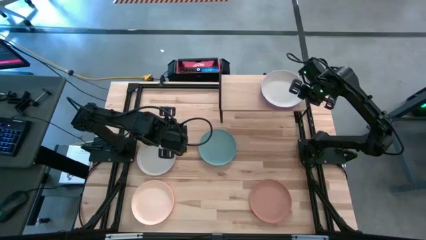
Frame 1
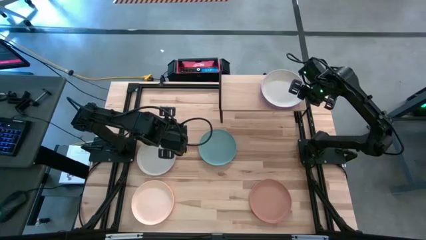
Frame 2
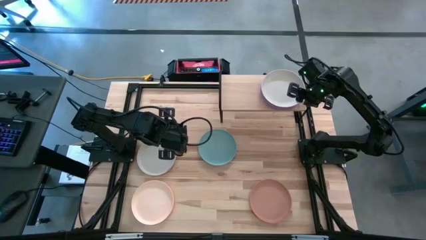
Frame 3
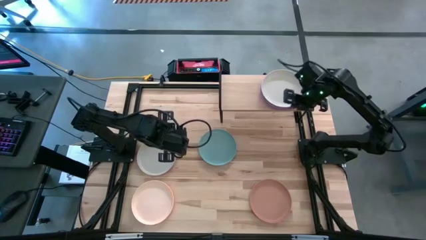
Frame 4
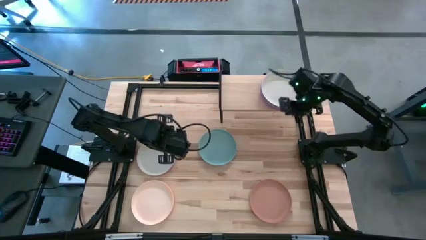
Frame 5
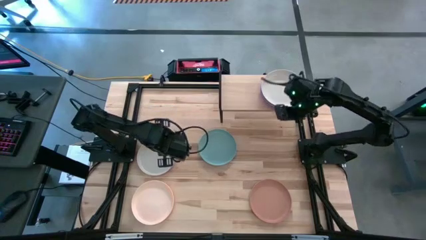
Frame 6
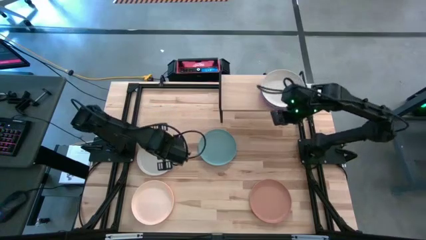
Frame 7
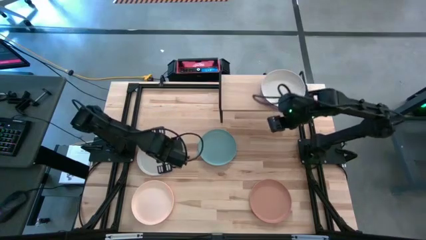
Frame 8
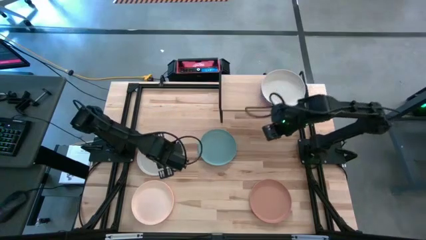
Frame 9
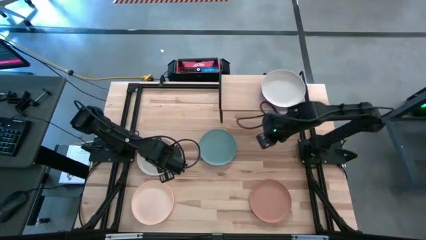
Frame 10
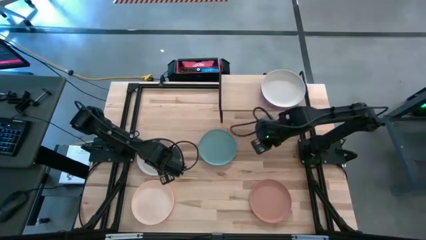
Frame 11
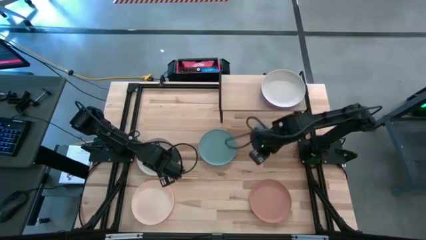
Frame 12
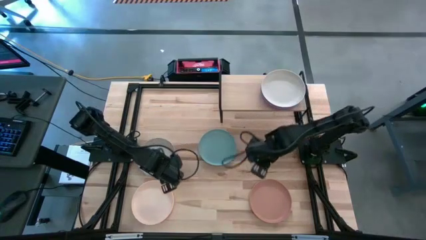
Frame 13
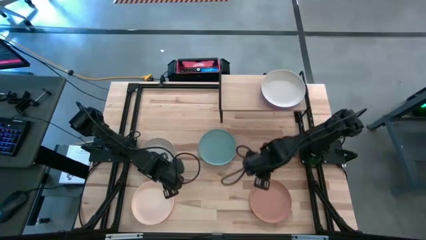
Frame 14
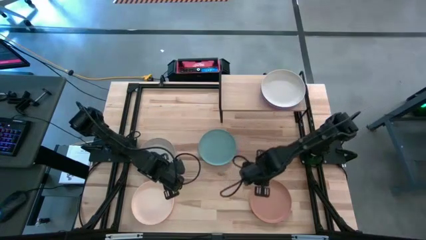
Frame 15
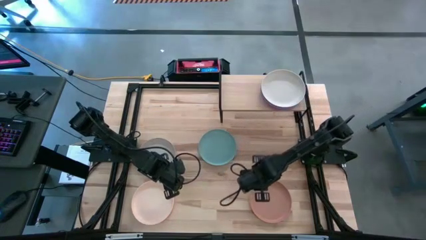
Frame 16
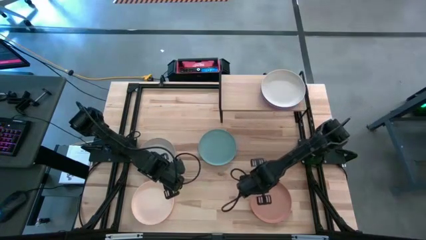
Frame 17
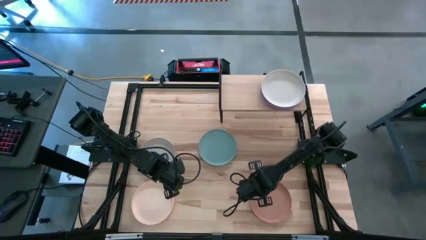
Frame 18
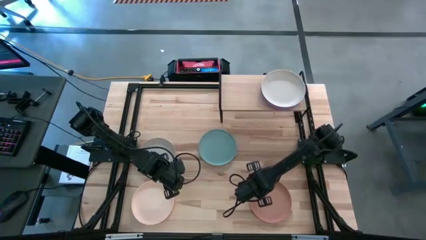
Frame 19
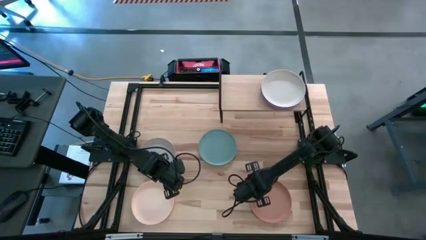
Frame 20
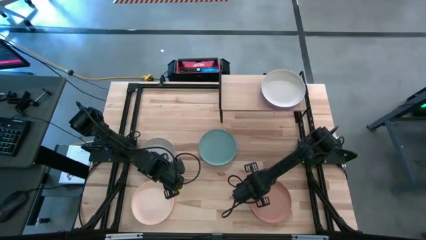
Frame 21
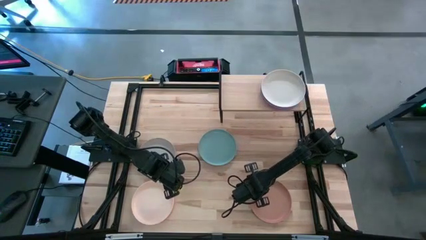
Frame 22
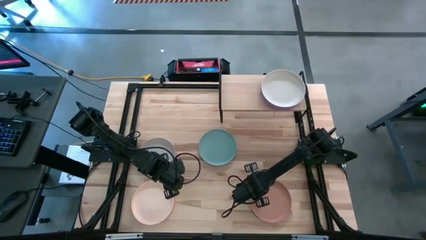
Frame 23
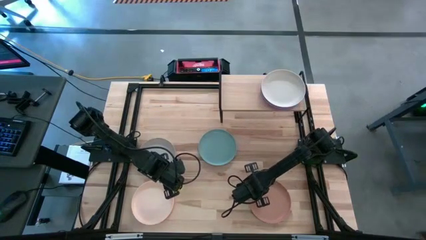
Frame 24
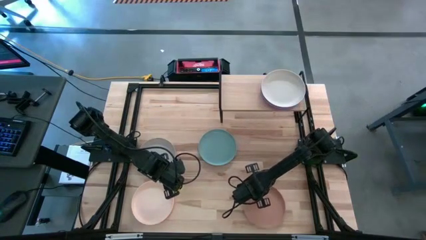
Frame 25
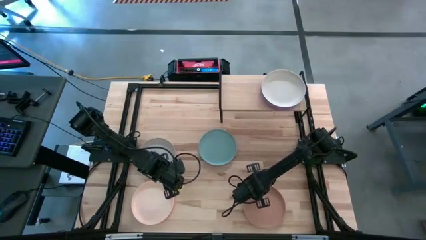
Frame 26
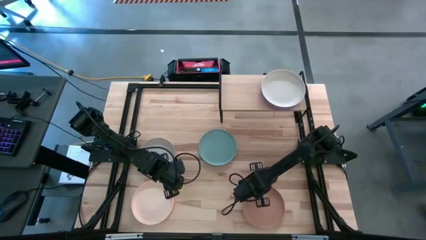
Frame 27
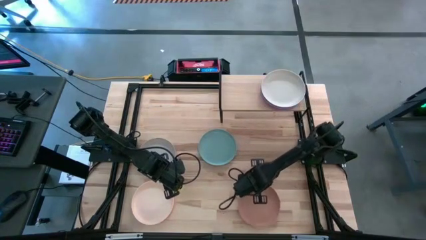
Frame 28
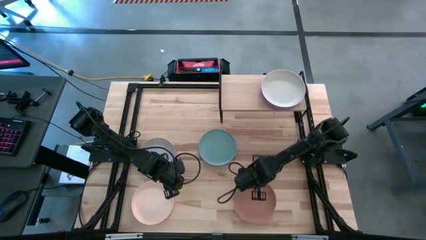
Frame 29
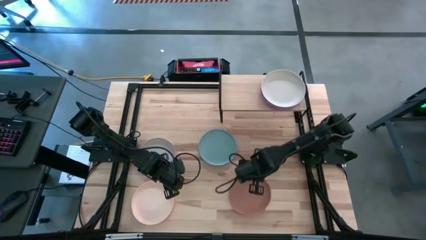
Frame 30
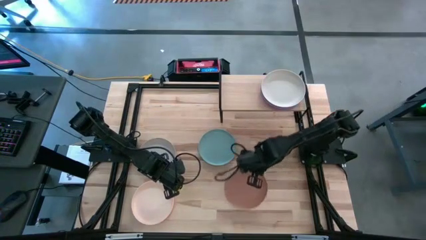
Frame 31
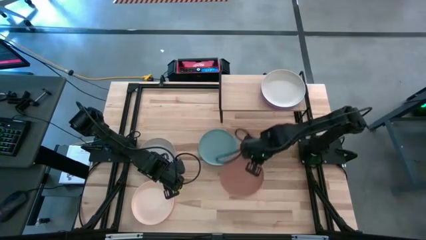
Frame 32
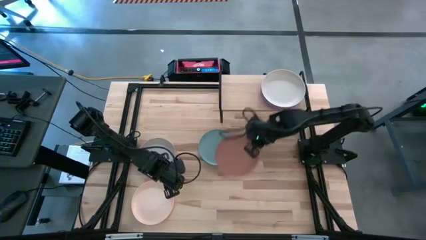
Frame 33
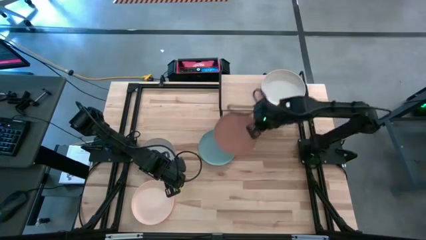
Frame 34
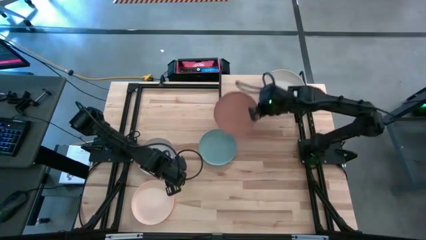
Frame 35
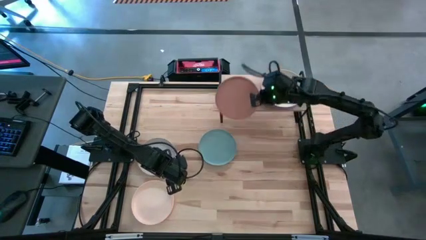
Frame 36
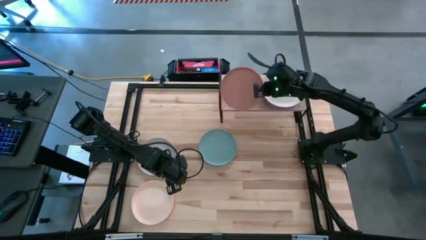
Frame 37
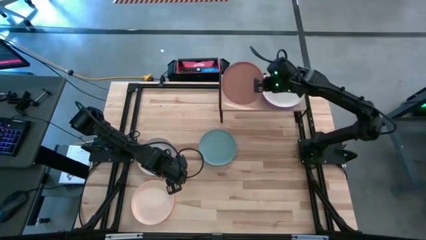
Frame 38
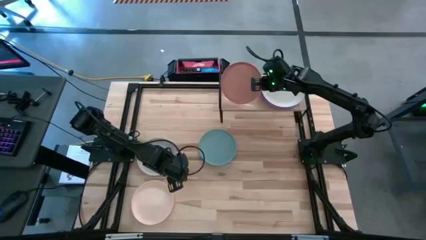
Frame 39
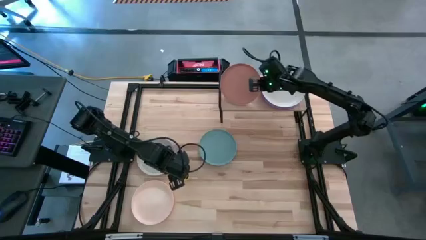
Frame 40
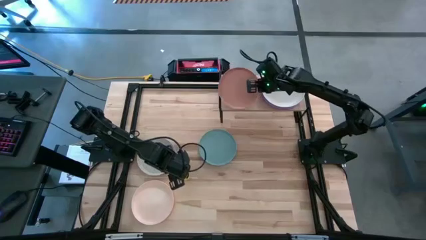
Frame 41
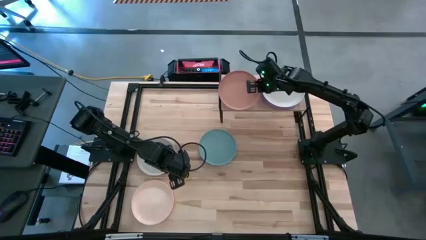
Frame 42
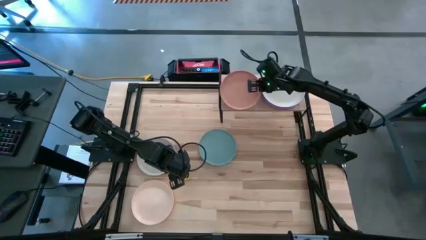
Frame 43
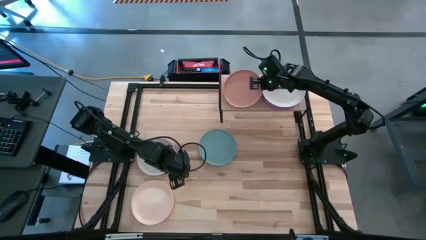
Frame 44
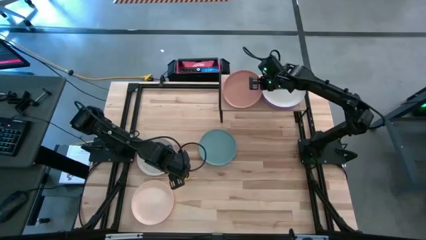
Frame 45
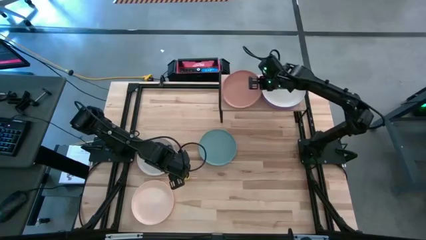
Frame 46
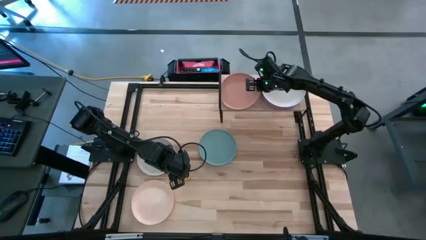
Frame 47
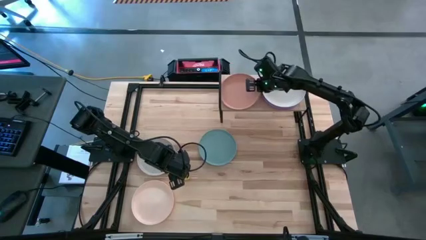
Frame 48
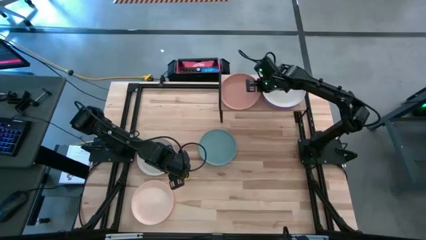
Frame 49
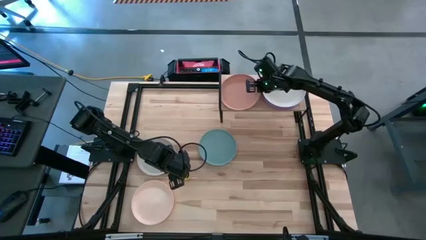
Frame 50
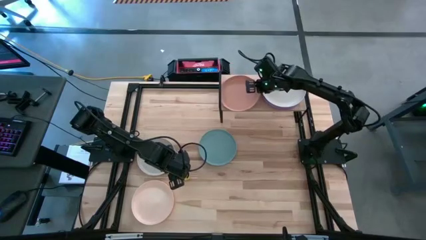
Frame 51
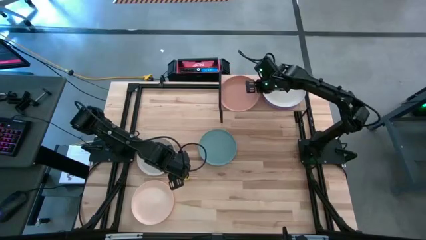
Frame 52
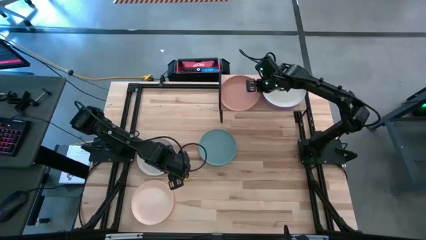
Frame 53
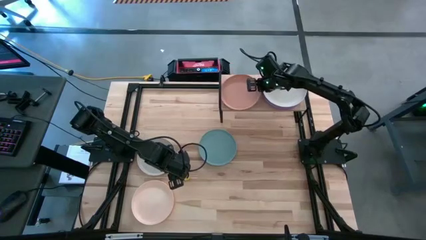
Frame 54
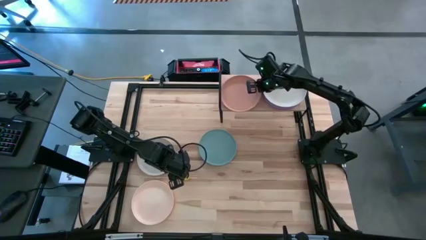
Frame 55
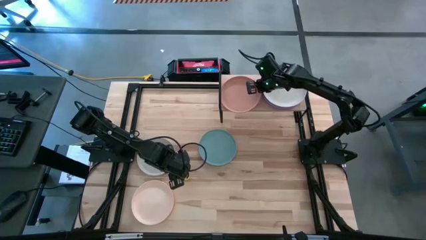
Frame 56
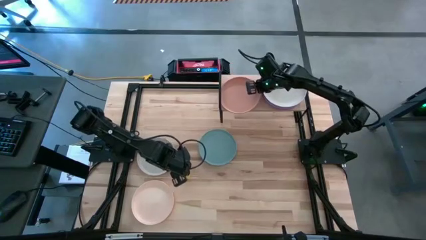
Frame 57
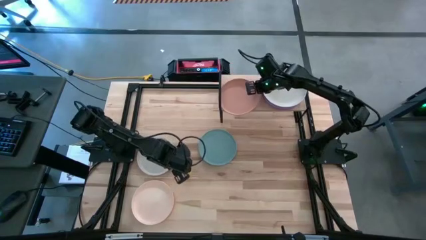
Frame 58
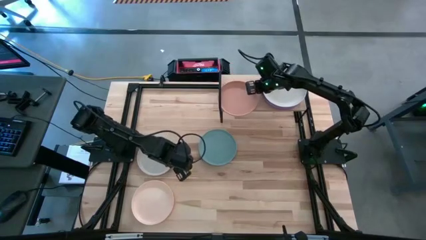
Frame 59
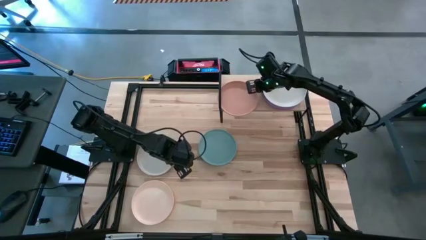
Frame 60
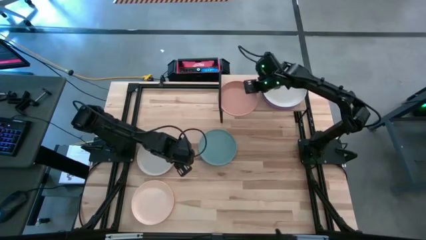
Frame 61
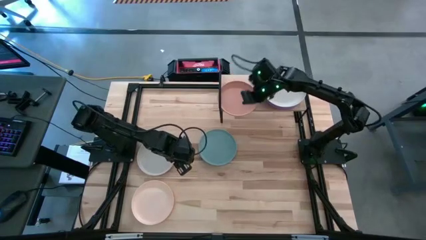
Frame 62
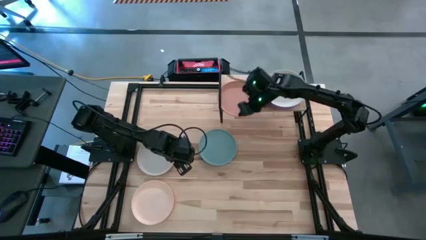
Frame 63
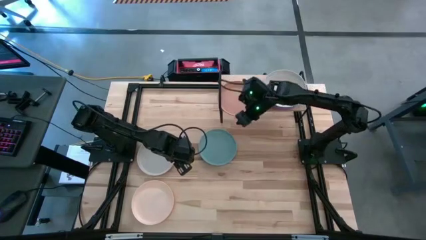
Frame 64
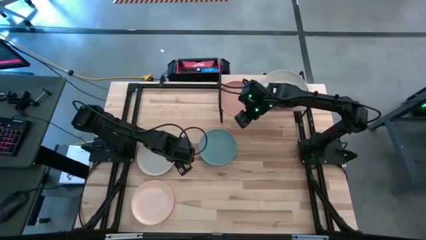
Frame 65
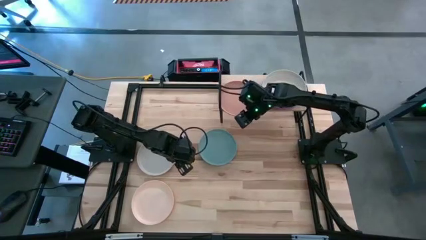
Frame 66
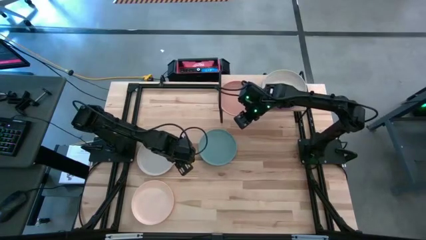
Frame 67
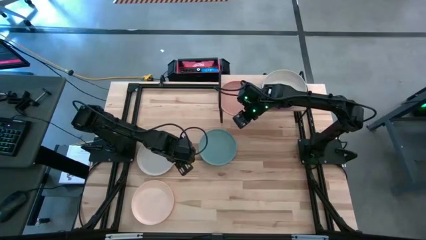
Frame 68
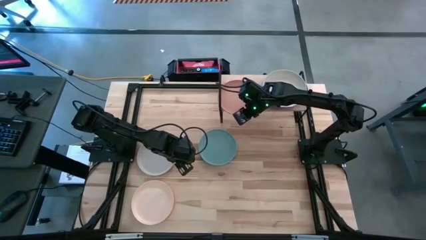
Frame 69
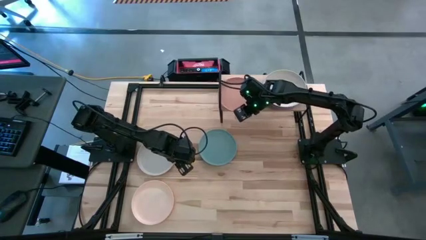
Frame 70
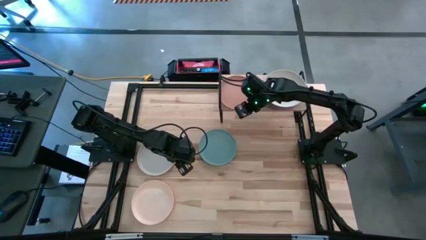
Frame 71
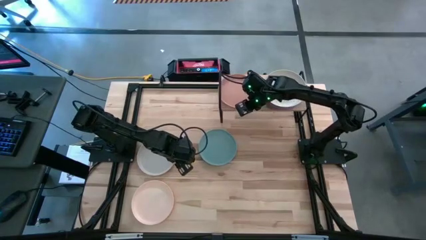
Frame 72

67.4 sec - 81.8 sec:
Task: Place and stack plates onto a shelf
Put the brown plate on the shelf

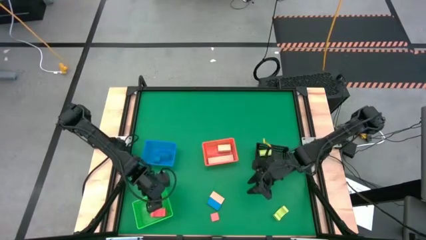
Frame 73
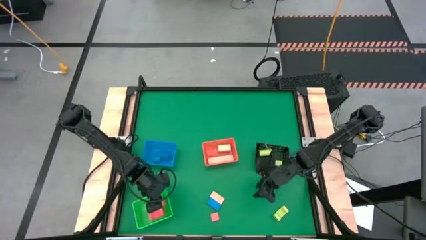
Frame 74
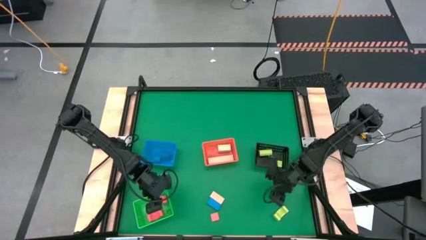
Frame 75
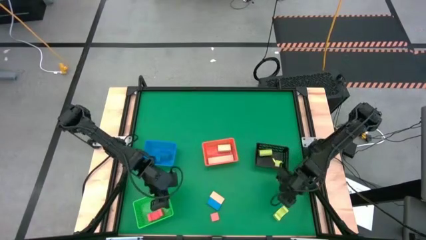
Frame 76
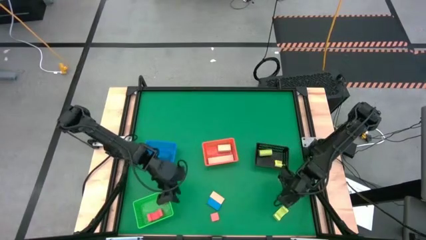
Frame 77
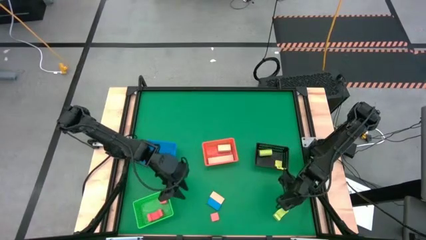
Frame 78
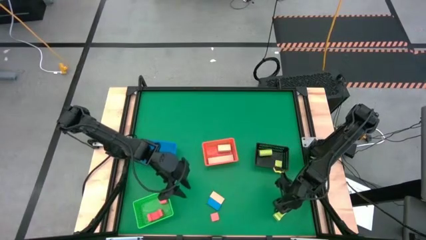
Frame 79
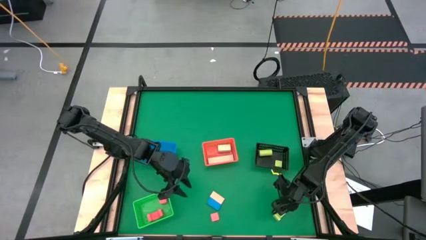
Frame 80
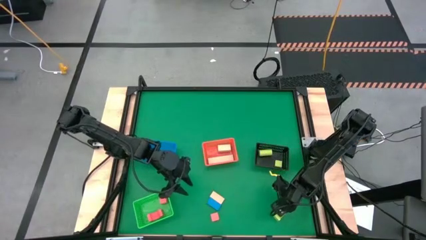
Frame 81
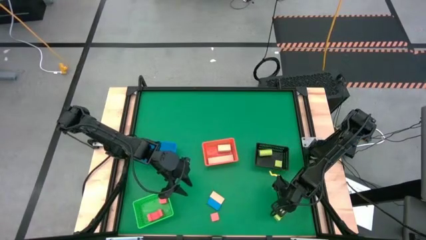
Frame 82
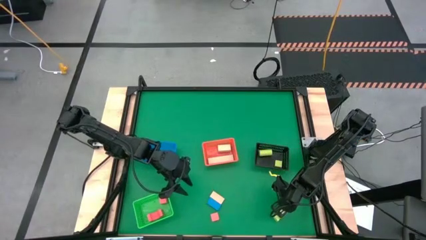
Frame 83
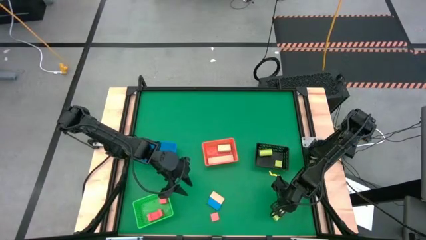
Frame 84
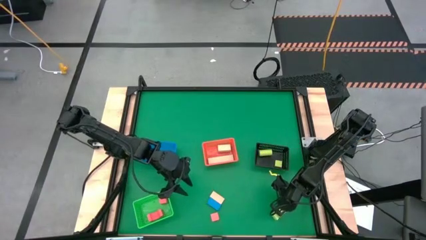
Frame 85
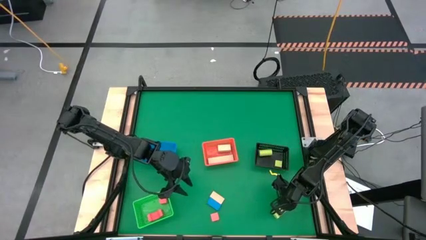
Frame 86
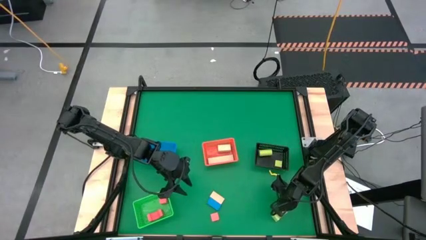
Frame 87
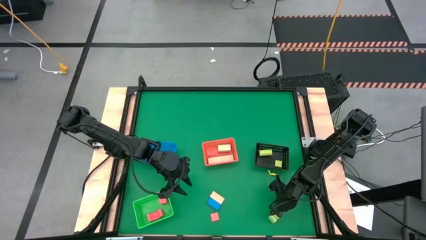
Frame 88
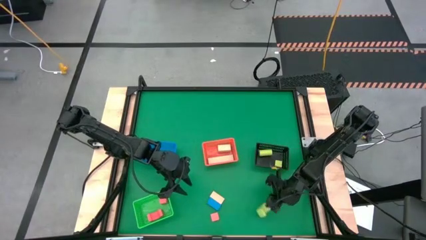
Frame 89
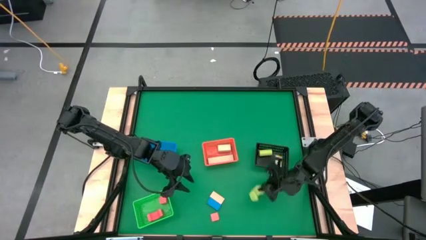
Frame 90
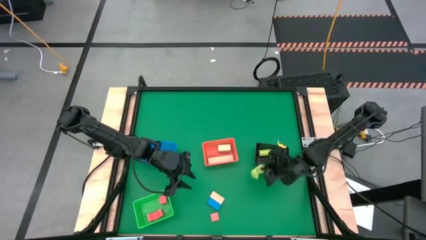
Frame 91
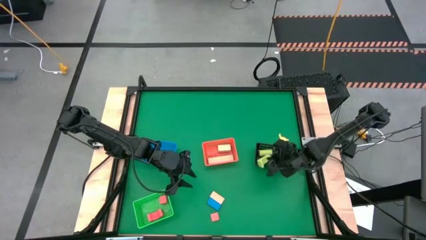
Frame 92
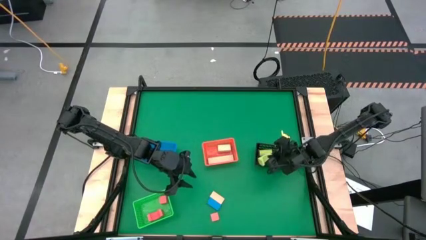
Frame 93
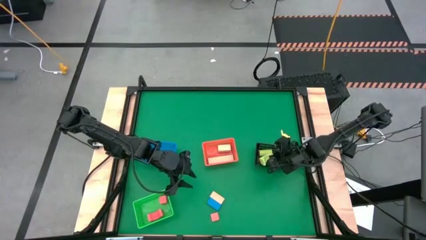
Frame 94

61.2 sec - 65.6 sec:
Task: Sort & place blocks by color
Put the green block into the black bin
